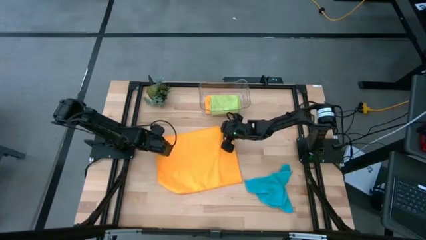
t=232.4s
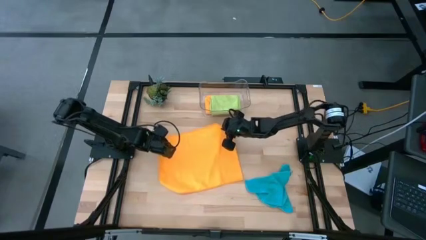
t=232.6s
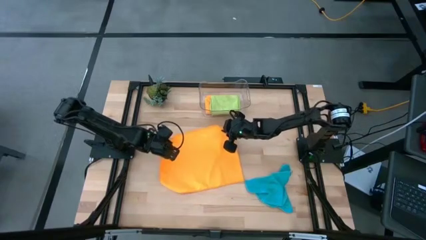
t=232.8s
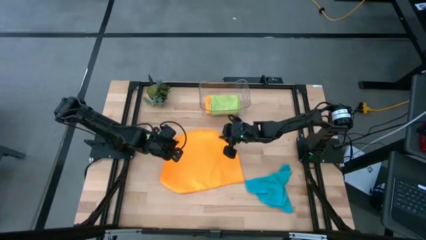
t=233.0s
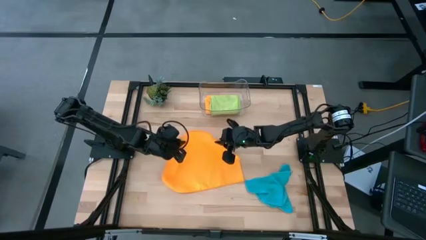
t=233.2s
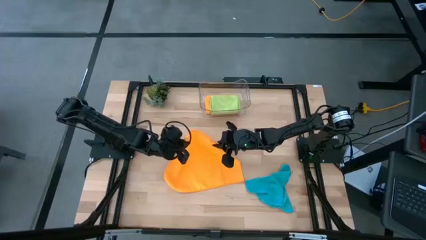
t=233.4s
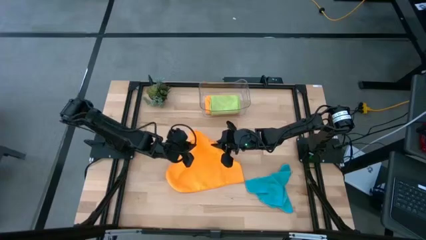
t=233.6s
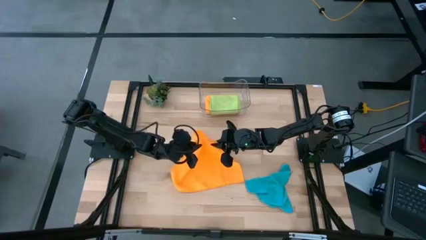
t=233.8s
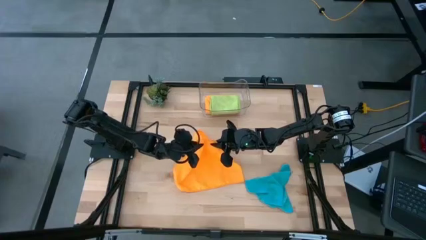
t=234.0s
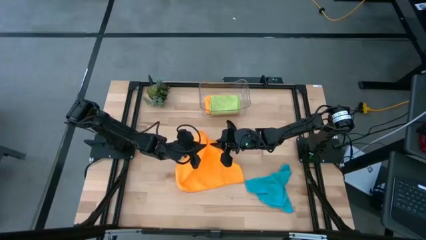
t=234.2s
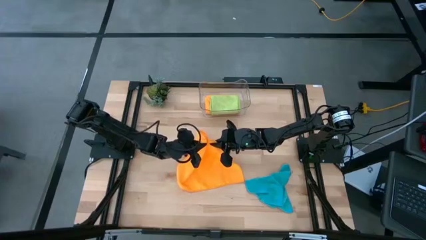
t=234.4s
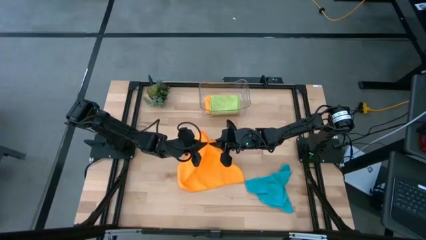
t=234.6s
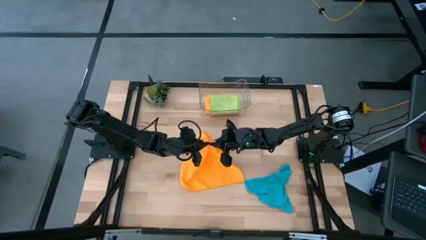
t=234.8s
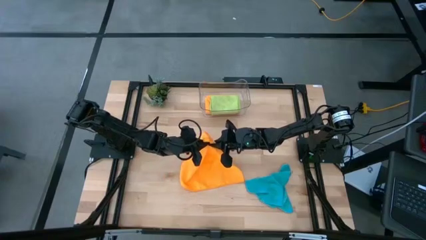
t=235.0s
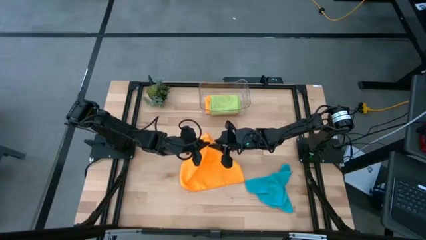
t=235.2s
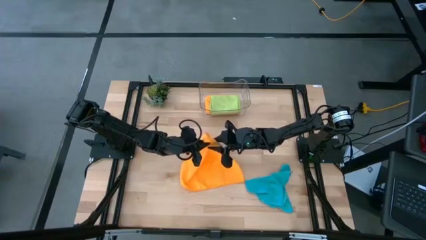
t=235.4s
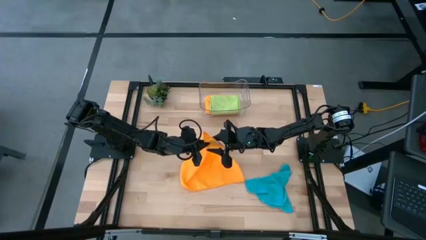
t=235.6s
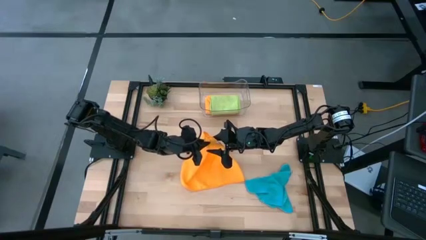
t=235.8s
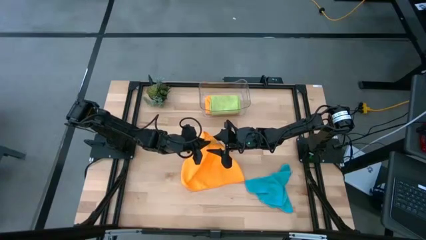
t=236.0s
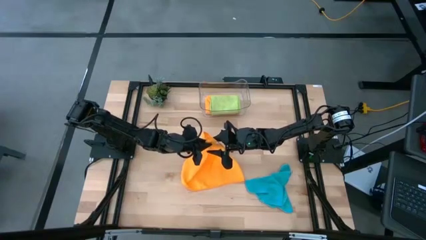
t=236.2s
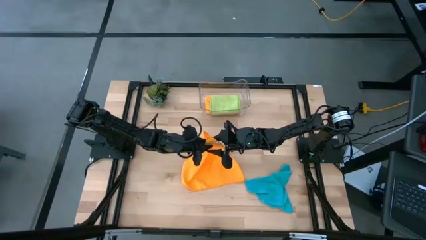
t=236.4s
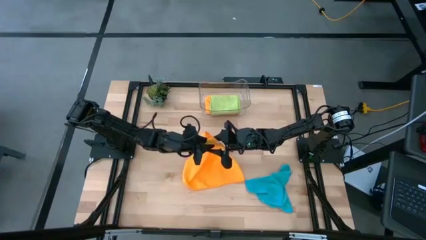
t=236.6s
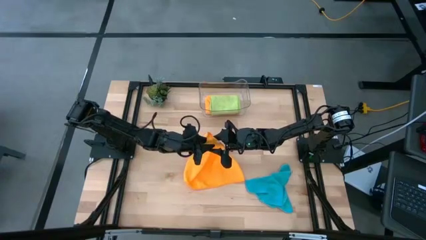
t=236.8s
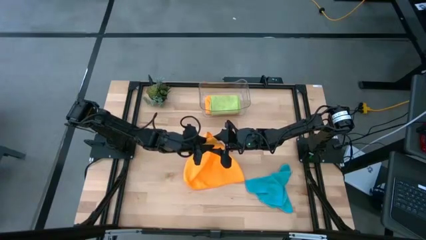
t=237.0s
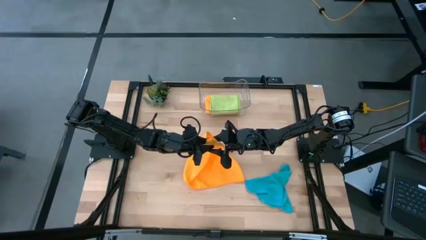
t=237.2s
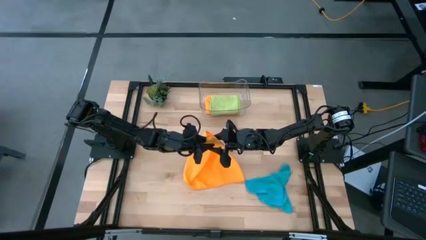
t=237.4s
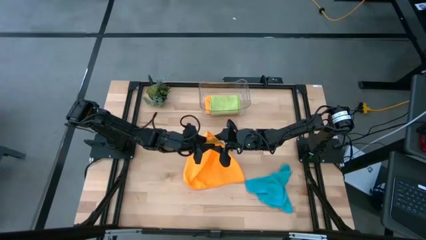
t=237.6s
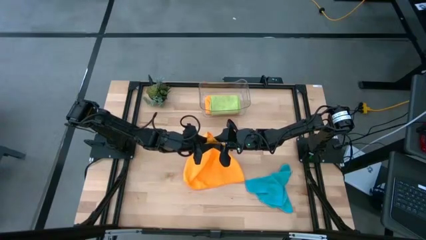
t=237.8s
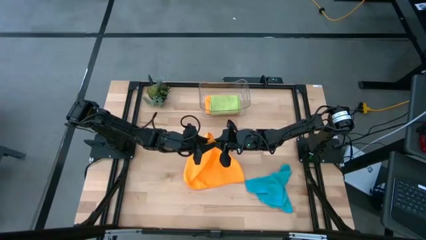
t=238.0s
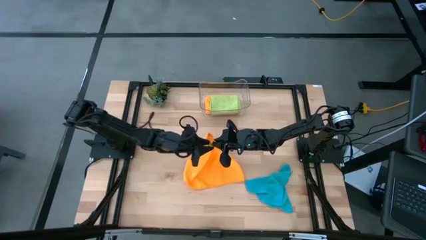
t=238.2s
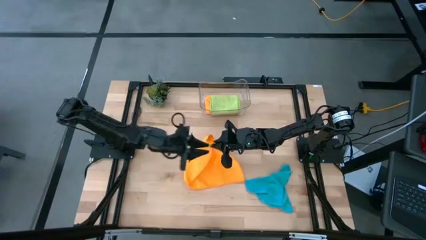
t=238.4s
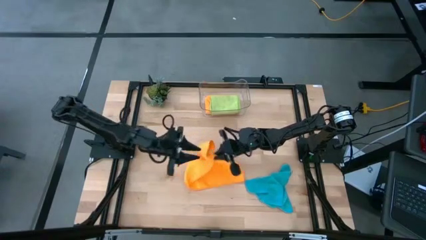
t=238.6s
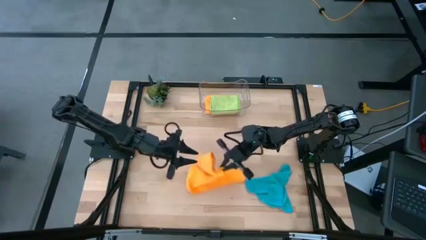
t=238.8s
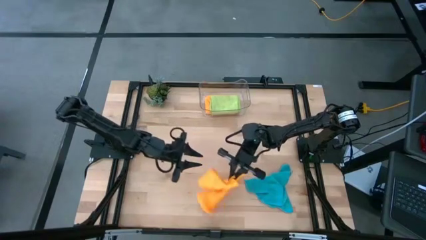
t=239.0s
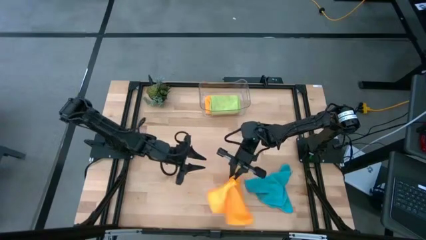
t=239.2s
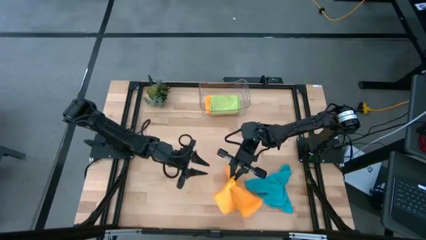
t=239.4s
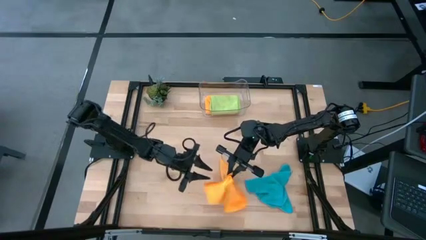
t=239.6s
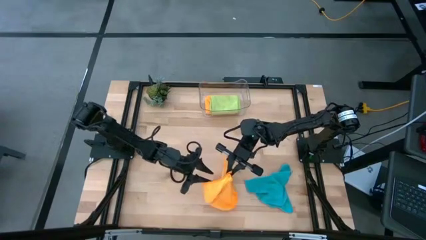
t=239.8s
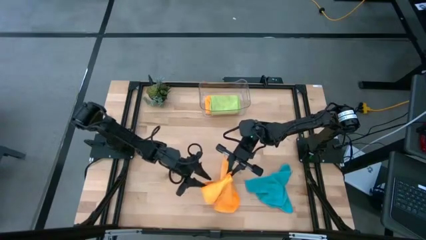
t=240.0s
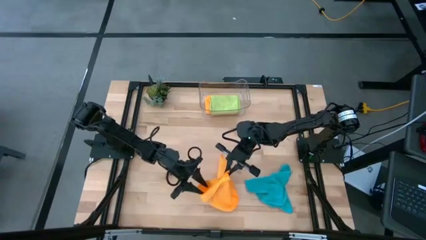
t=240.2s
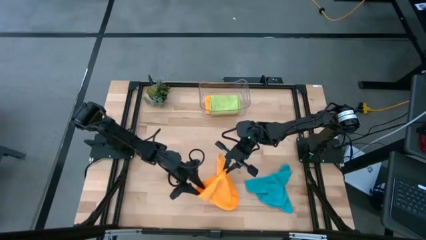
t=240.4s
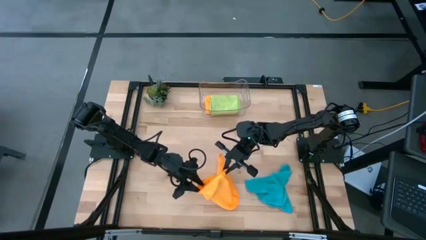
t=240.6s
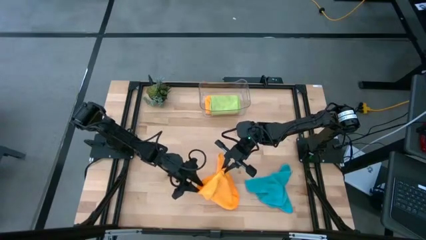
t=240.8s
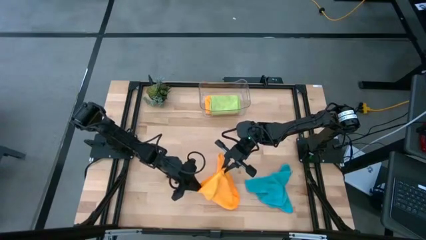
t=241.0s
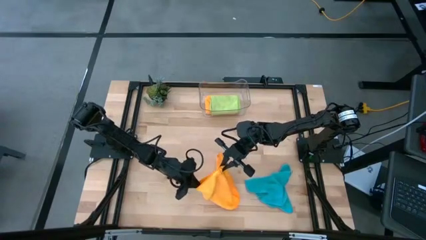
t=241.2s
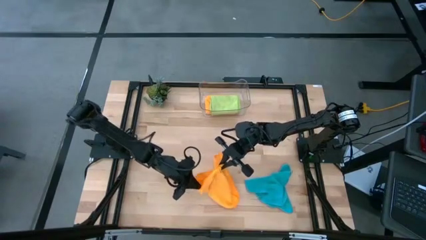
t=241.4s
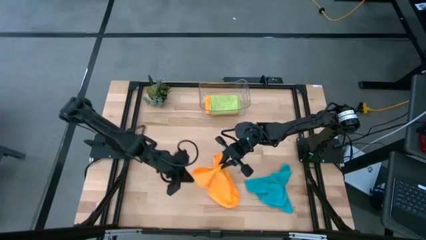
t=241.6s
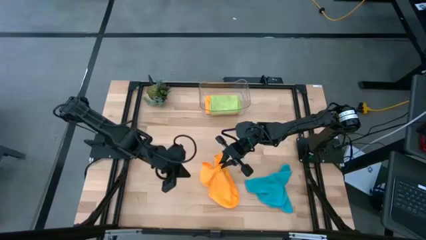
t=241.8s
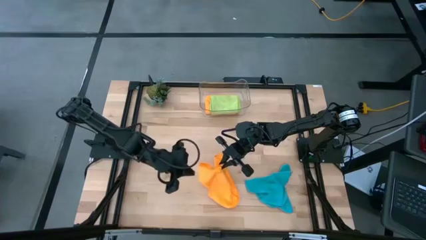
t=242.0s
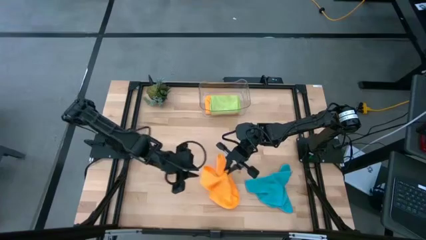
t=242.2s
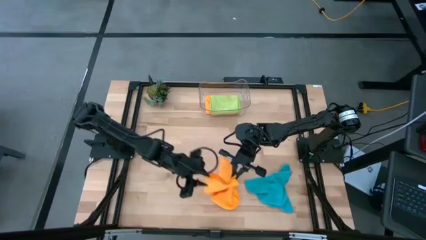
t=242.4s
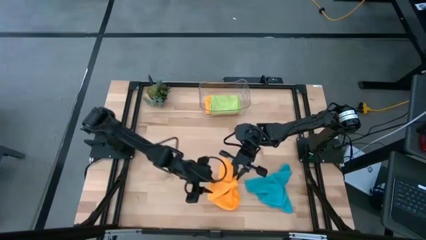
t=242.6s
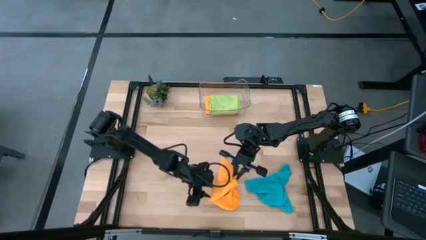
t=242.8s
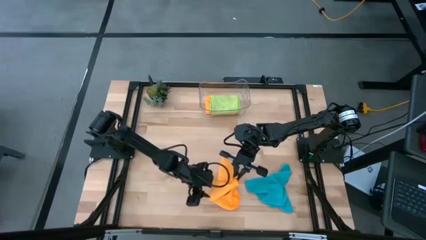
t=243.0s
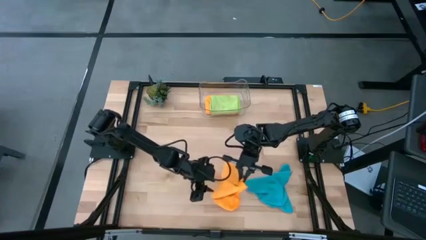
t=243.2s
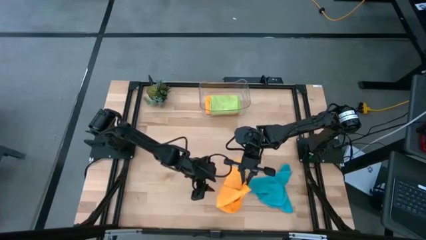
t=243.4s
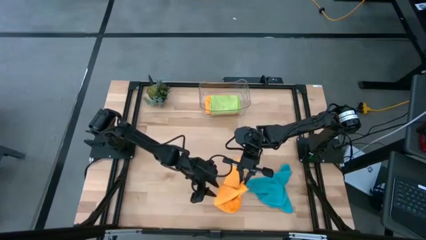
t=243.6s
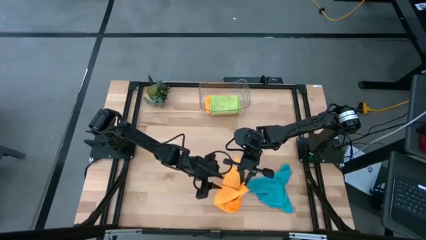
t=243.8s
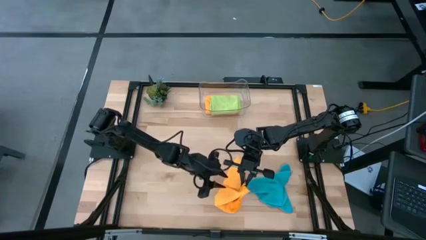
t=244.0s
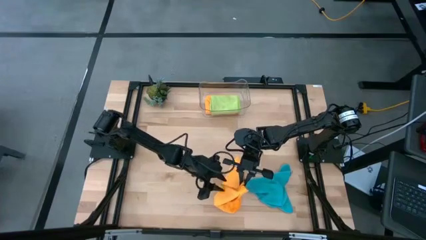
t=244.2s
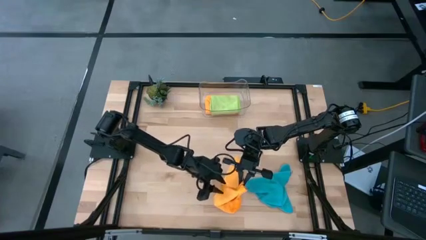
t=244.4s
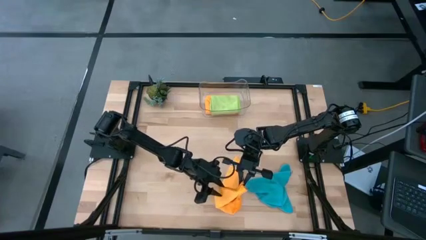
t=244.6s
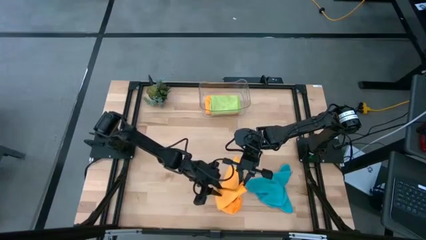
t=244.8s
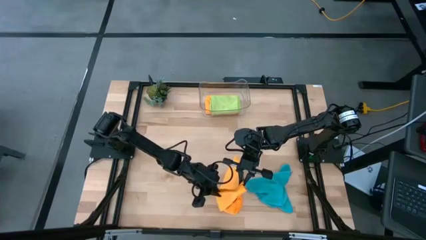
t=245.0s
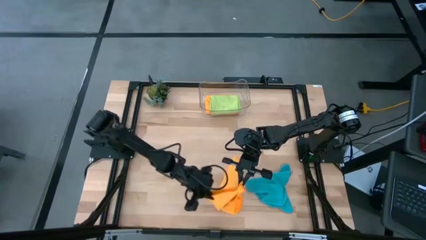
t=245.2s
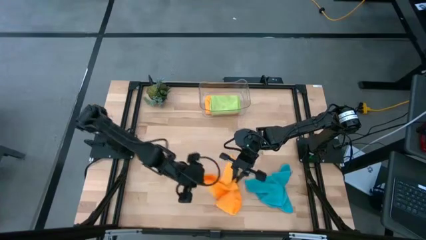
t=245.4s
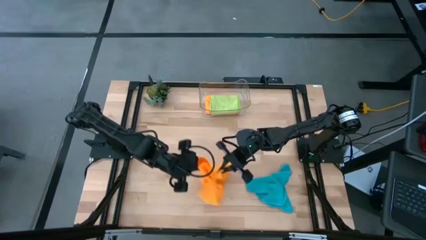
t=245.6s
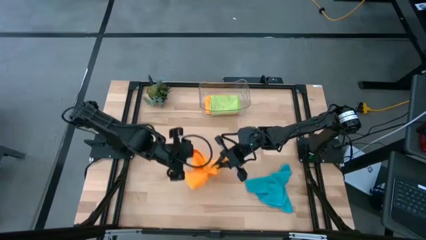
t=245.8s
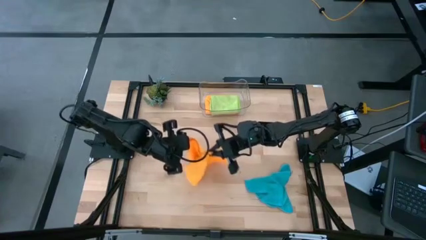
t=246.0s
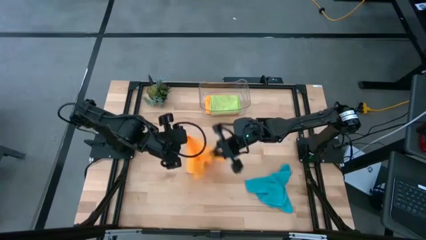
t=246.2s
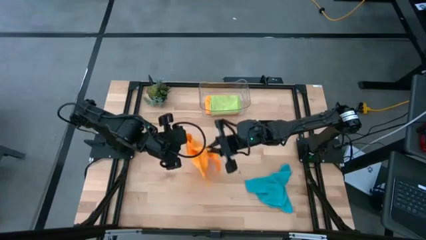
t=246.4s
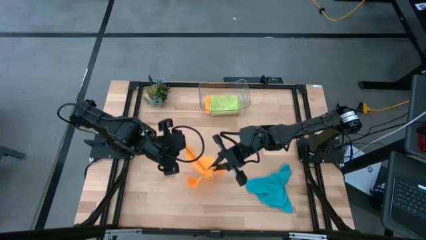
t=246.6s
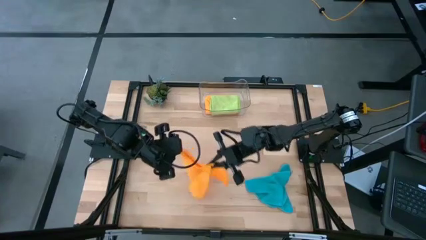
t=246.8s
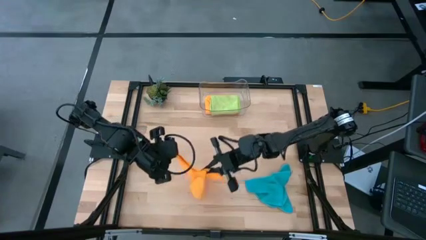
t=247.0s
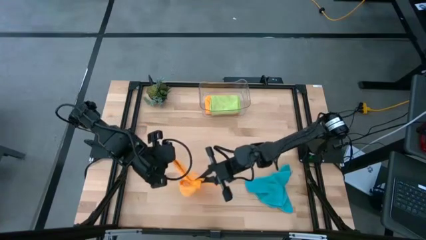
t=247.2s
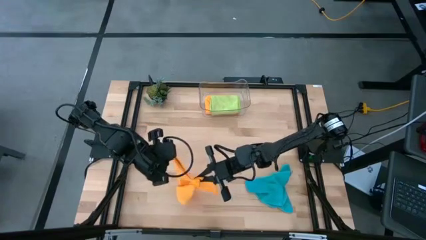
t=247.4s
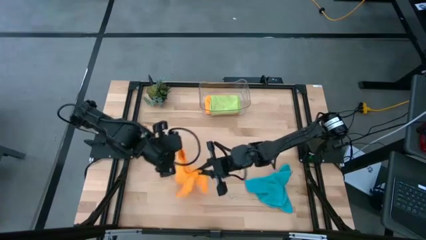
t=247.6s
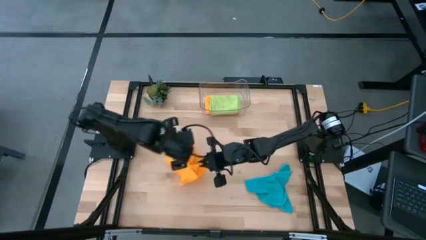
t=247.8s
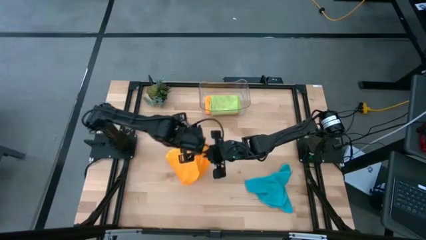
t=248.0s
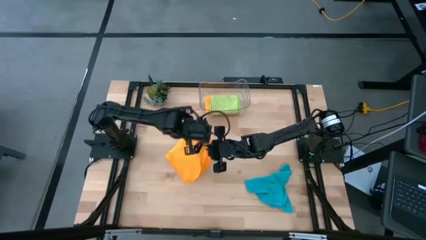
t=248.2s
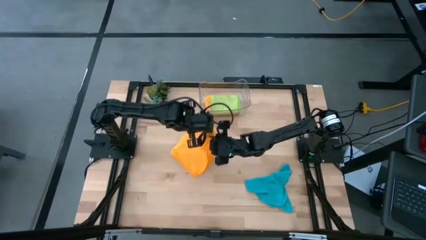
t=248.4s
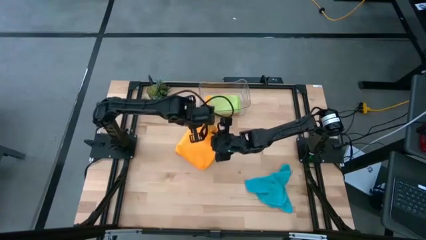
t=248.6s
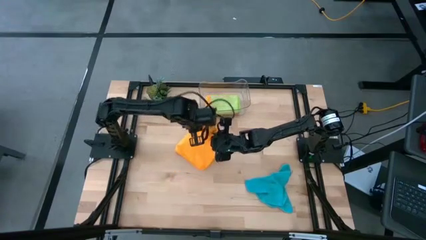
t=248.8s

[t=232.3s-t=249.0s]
Task: Fold microfiber towels
Fold the orange microfiber cloth

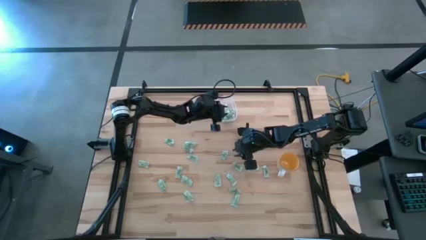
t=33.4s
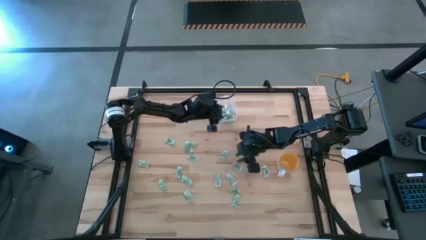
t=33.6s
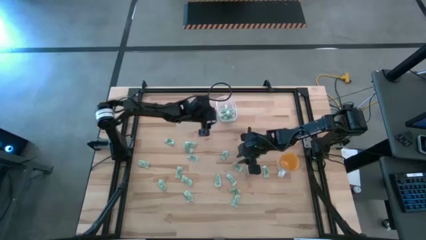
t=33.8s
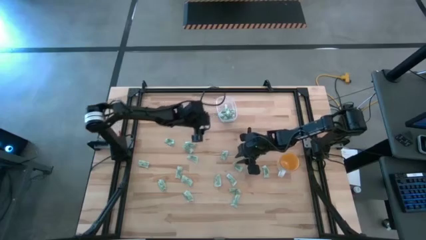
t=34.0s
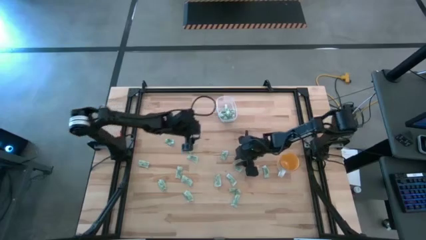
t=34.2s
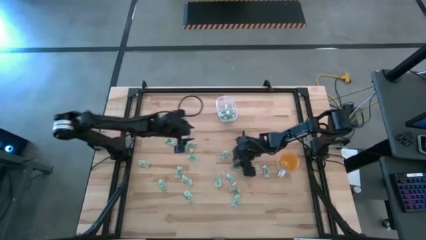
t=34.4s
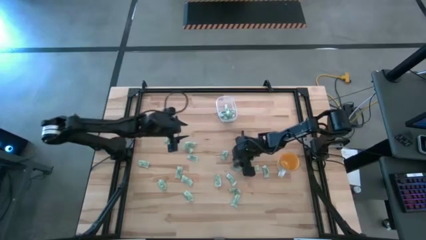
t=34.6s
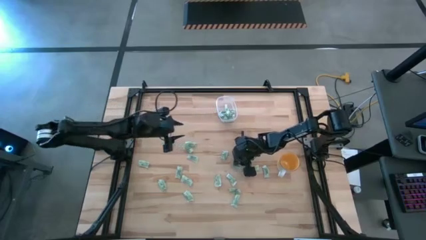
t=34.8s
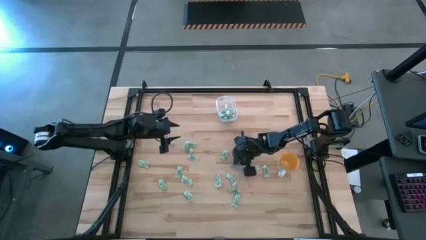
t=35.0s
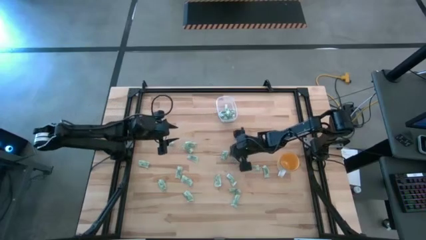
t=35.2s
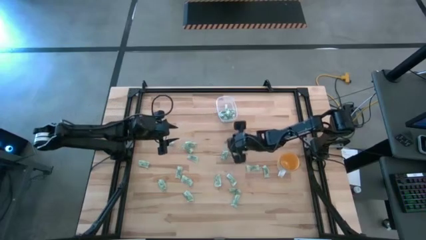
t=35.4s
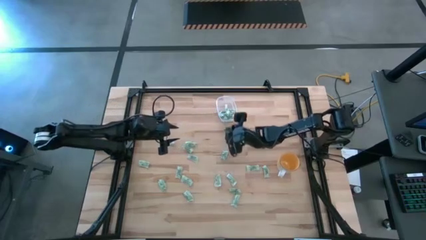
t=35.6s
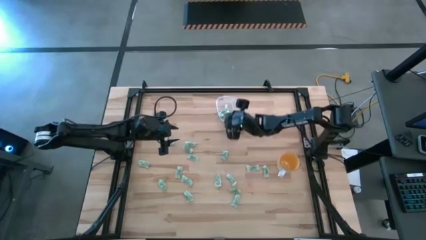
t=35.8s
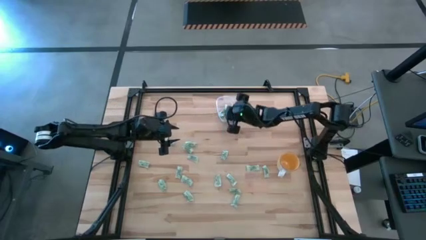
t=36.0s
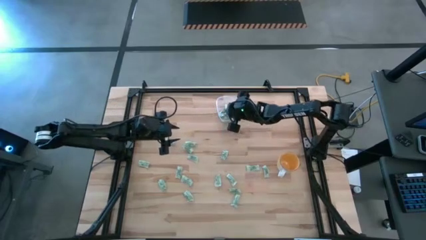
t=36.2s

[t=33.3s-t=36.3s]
Task: Pick and place Stevia / Truvia into bins
Put the green stevia packet into the transparent bin
